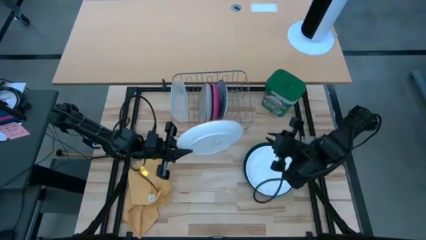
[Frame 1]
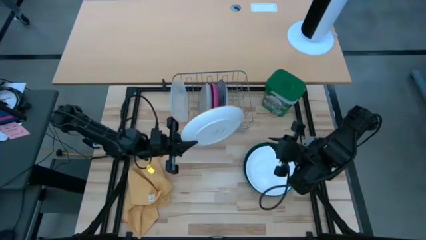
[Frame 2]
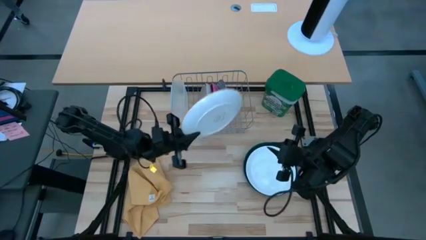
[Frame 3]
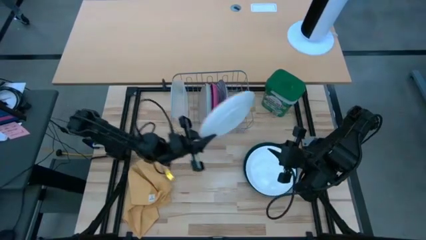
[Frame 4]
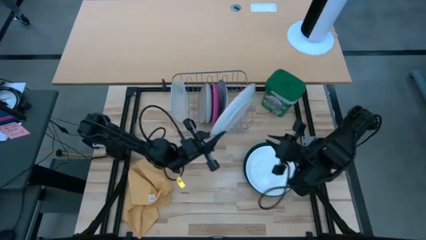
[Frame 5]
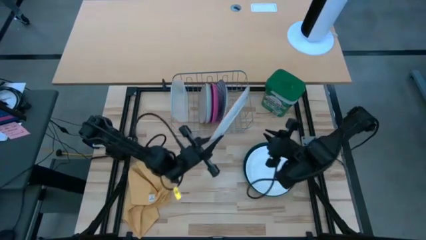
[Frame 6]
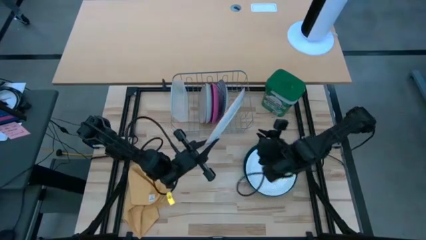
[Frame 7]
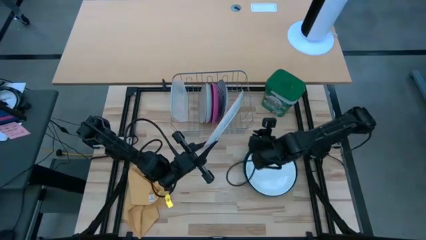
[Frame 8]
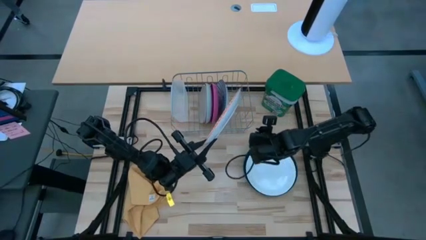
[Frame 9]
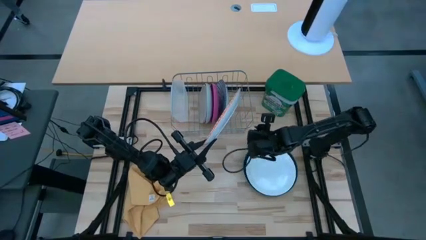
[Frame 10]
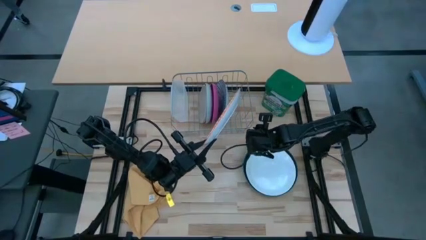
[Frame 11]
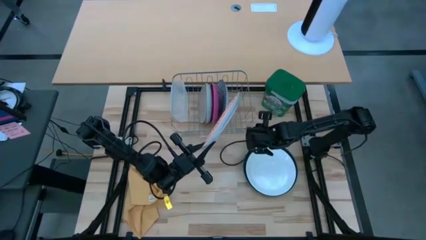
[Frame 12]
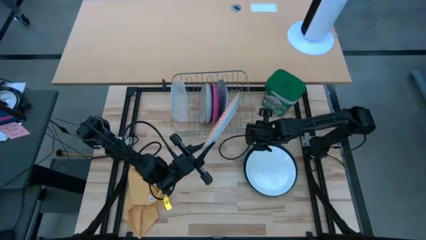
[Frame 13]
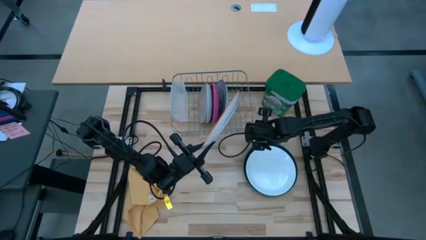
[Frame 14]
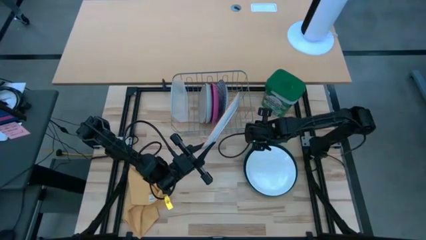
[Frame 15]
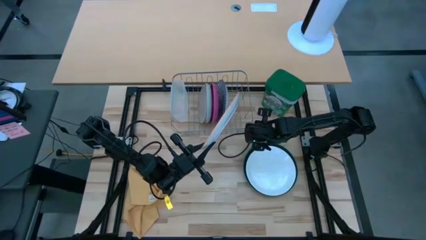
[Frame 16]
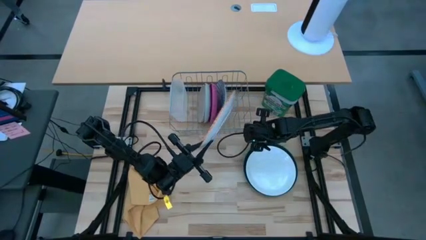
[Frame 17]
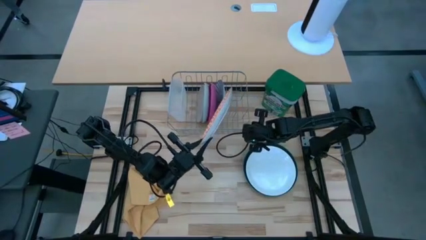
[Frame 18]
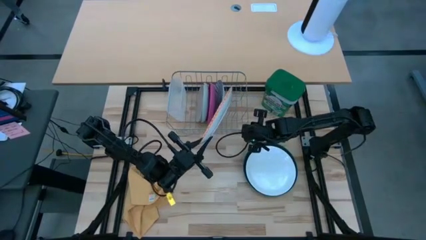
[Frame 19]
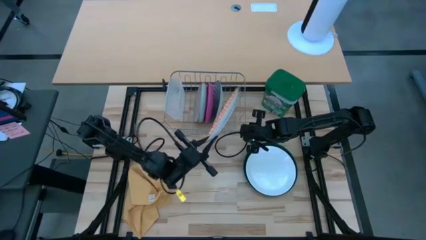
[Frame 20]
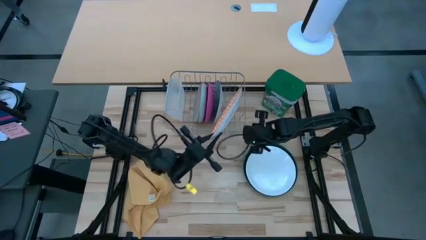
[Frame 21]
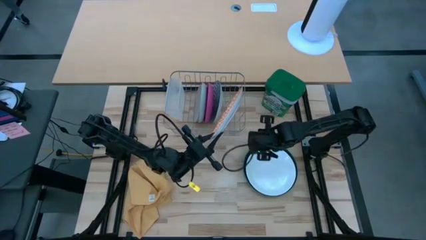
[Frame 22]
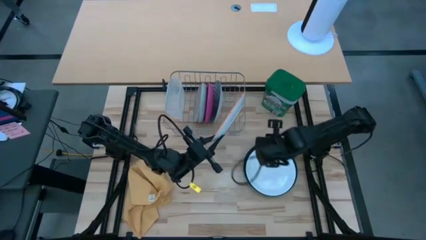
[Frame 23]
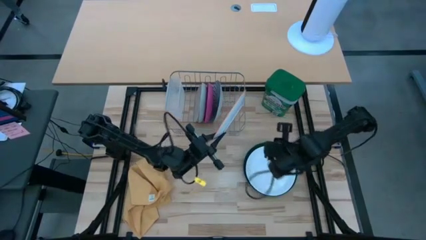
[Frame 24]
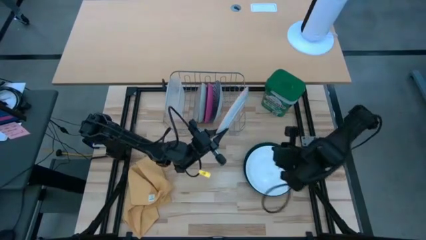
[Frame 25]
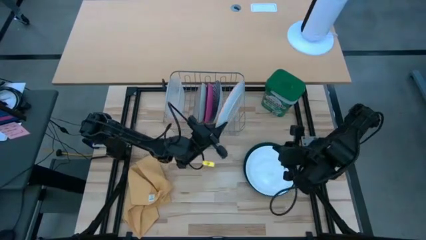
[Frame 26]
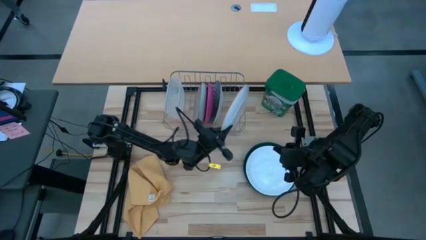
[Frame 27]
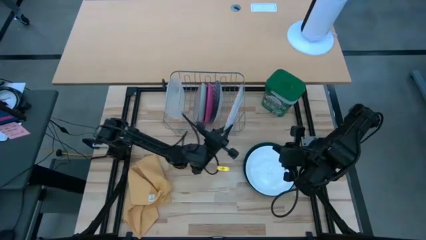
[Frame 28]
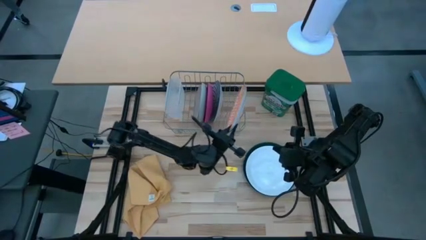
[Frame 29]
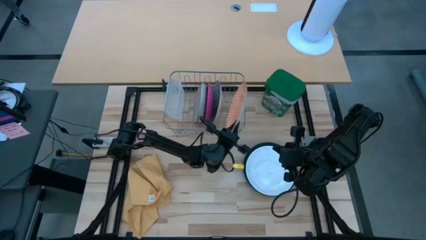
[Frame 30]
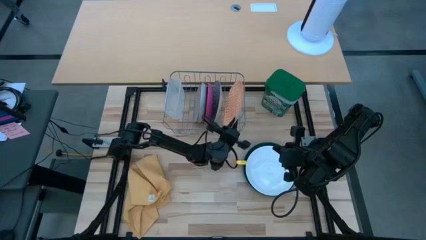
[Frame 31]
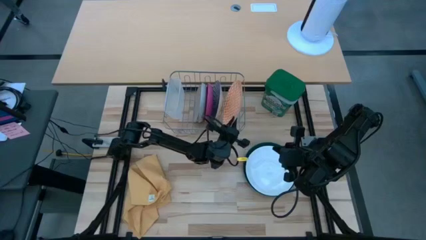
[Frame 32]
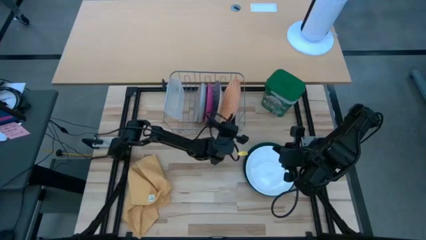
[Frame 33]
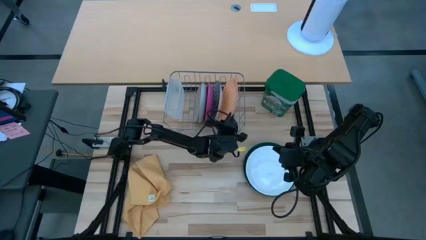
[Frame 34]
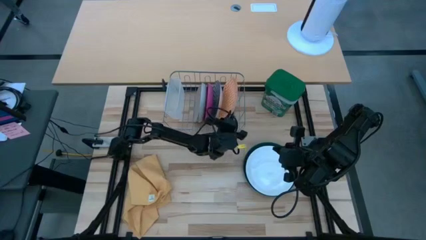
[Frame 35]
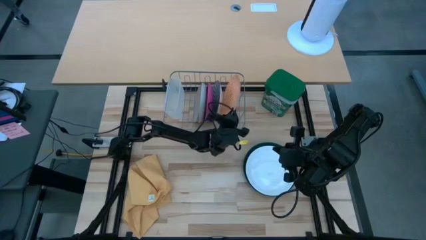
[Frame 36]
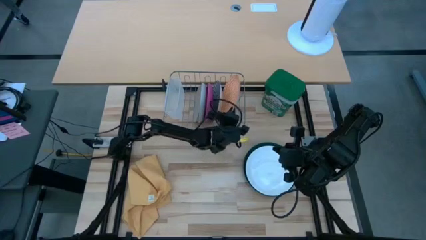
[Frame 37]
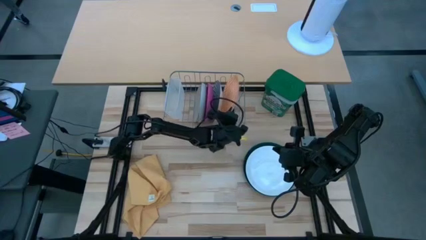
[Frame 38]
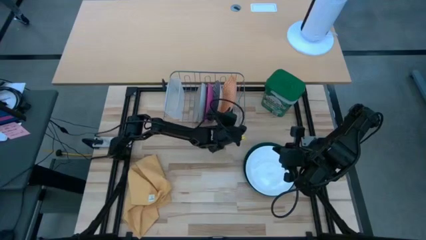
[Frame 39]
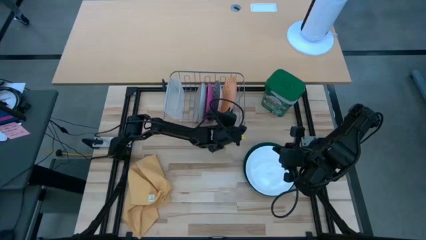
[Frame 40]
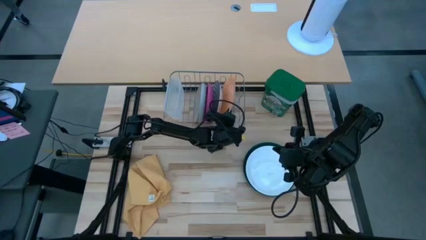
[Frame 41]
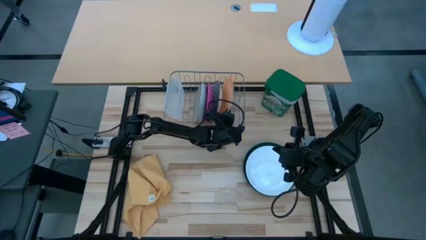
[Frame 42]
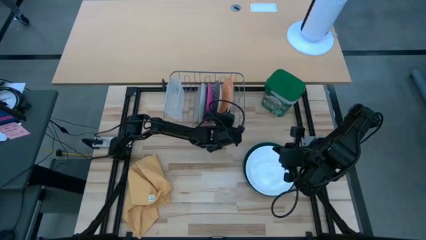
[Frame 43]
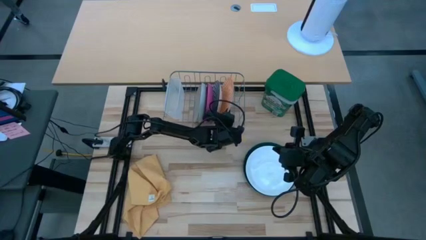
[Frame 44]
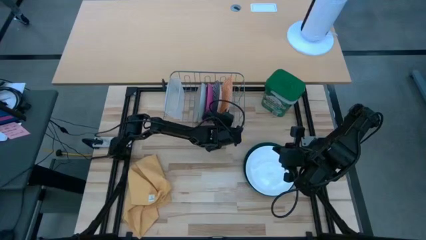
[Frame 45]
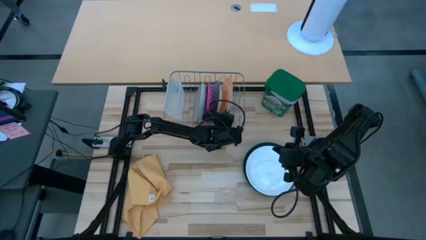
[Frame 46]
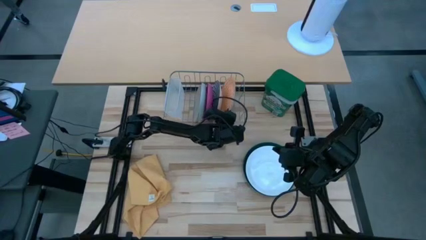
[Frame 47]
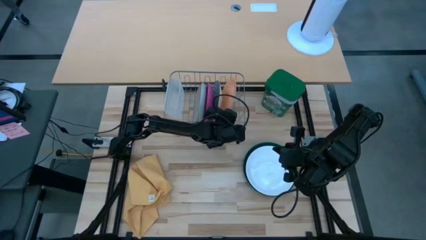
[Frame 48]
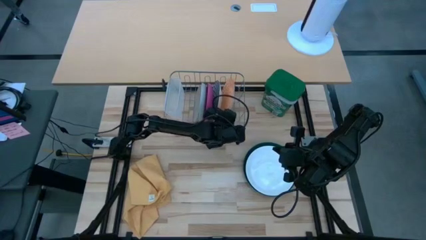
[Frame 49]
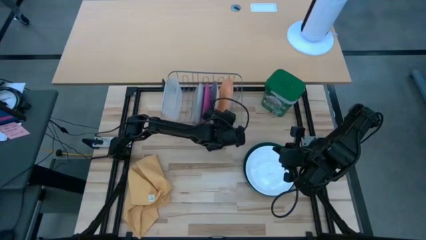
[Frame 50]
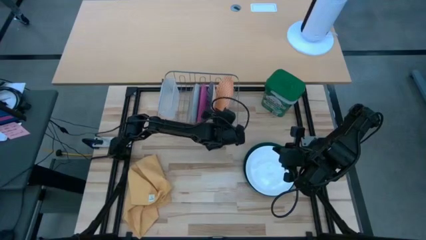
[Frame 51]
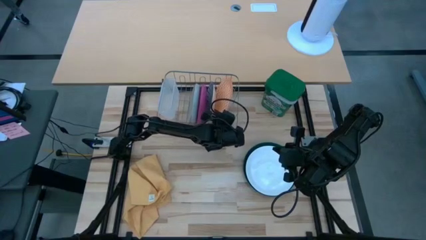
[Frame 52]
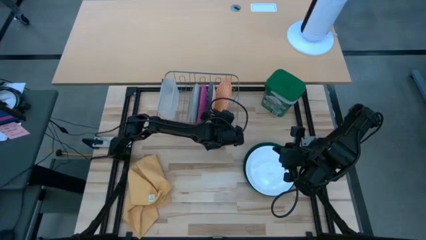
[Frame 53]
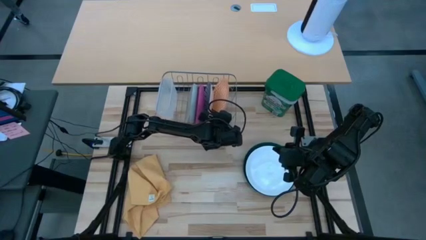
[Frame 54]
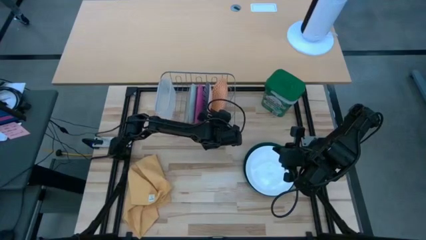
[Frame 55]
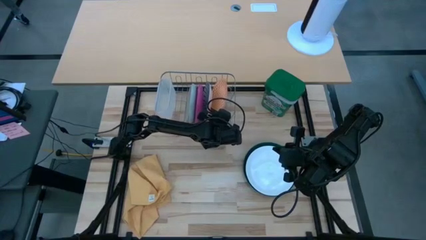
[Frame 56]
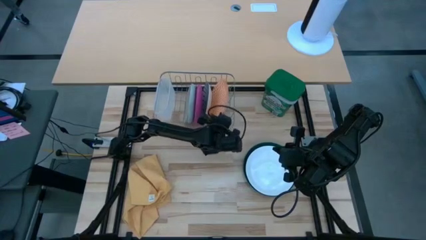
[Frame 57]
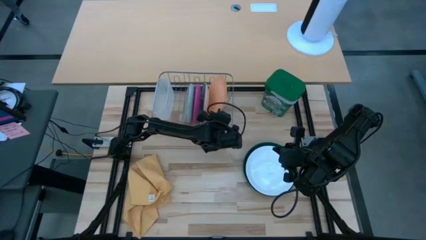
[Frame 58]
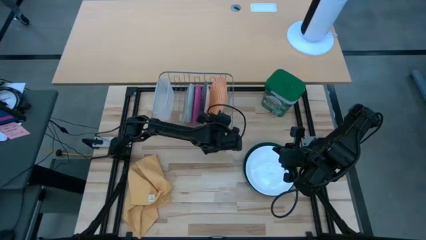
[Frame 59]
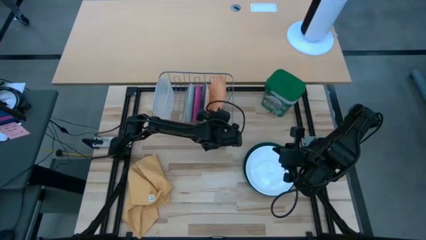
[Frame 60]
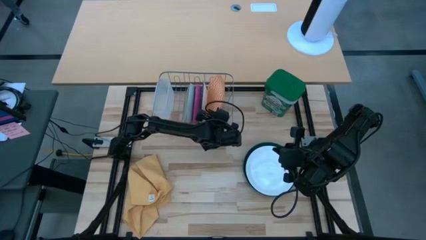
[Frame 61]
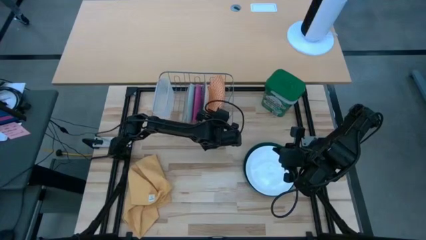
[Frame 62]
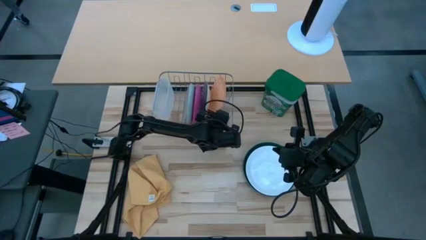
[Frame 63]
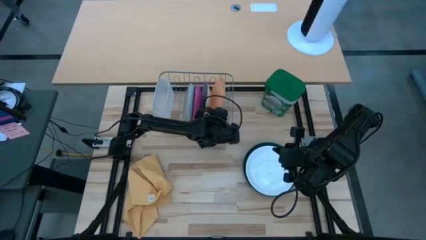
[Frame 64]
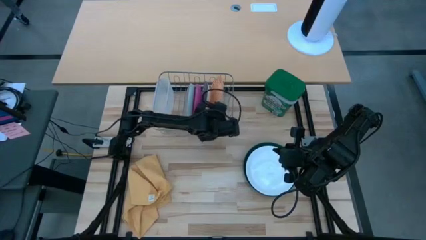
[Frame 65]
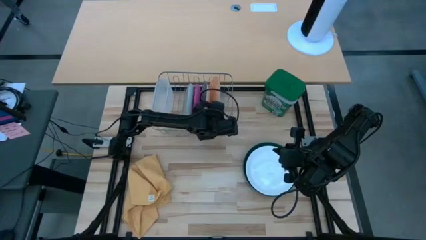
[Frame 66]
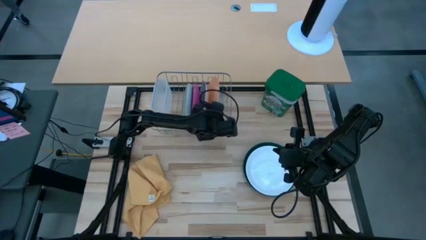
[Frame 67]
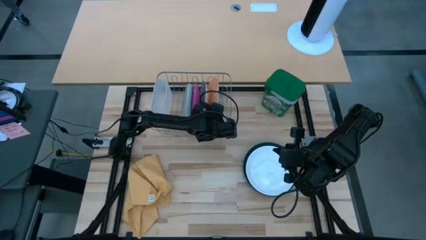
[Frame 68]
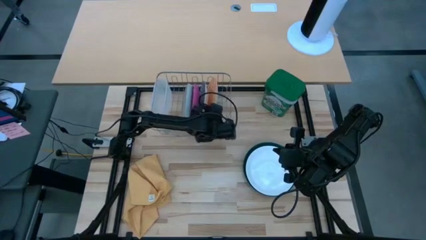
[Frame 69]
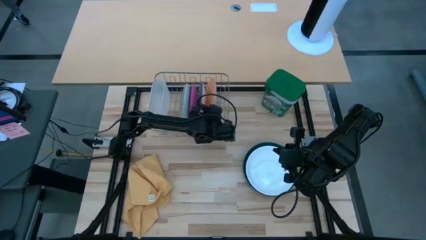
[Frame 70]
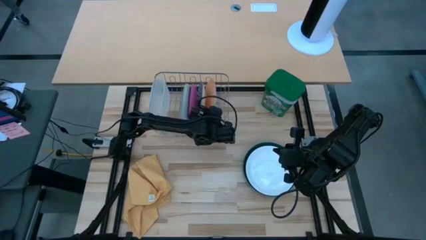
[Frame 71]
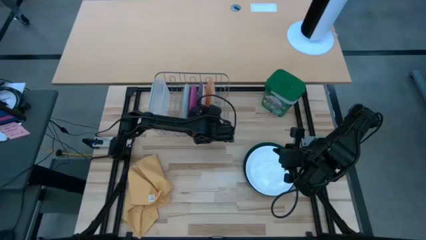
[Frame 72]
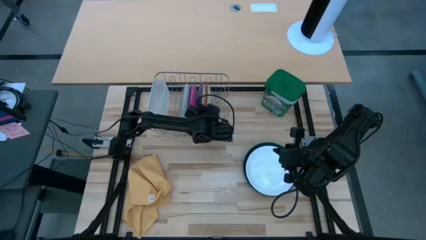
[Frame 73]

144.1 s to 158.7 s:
Task: Sort dishes
Put the orange patterned plate into the dish rack

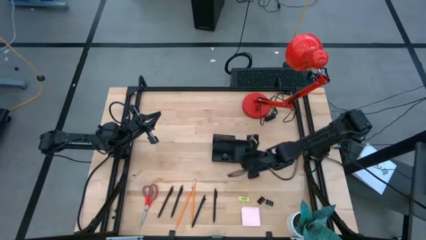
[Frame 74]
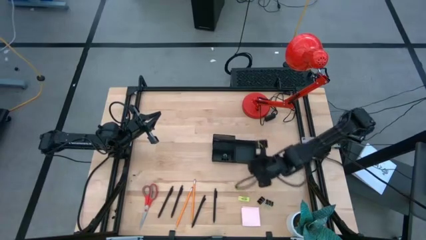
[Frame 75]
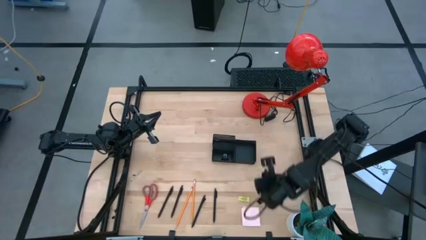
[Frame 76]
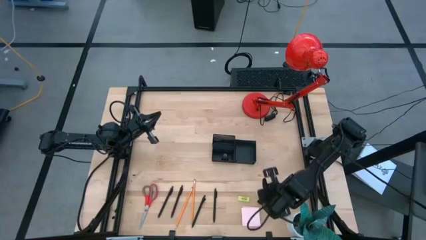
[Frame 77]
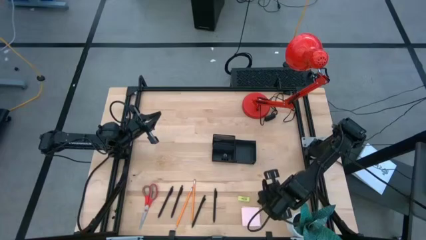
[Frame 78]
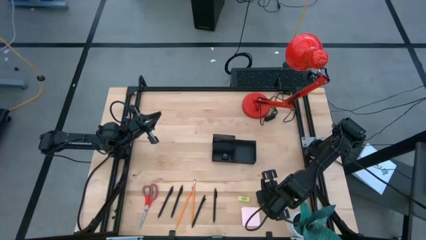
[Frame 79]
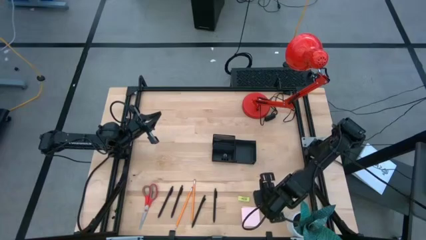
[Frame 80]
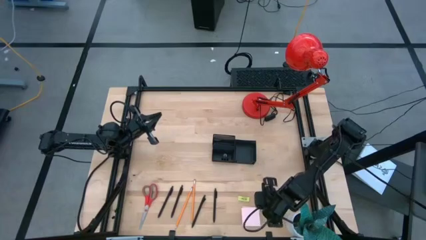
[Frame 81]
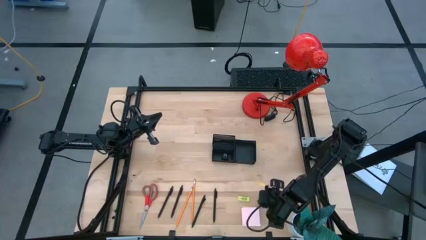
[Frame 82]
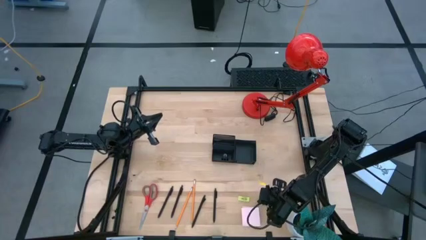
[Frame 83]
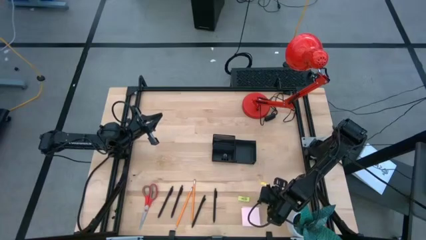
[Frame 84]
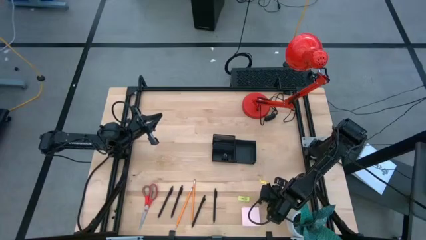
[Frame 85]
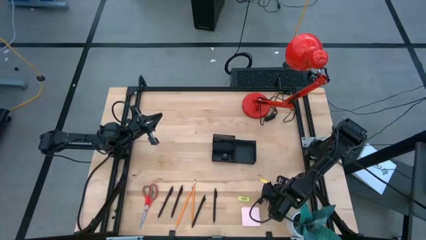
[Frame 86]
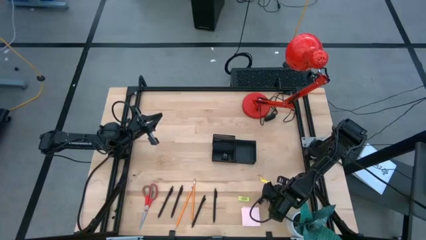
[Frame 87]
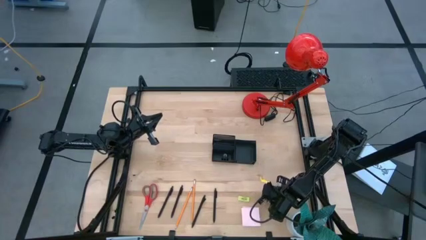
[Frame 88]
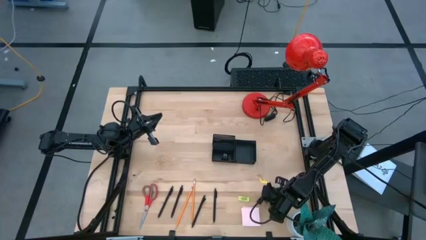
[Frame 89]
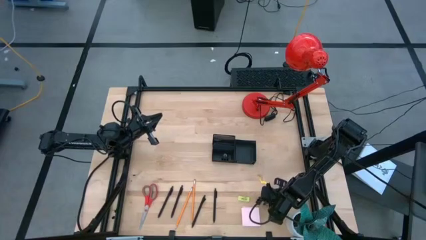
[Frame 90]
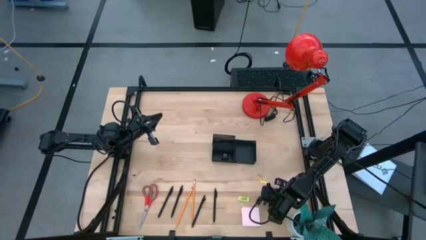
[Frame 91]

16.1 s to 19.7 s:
Task: Pick and place office supplies into organizer
Put the top right black binder clip into the black desk organizer
